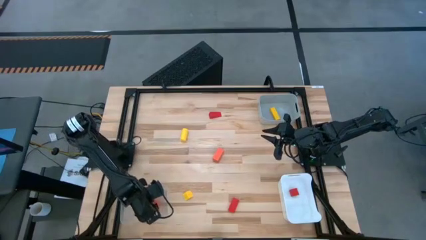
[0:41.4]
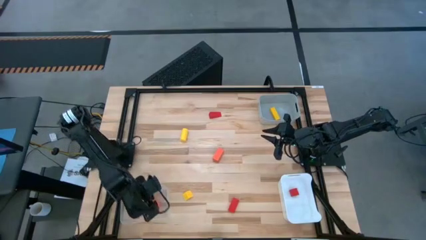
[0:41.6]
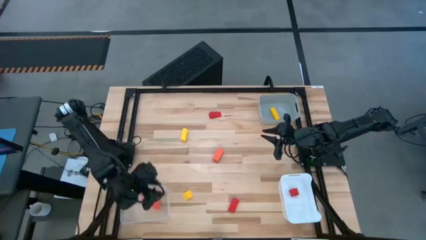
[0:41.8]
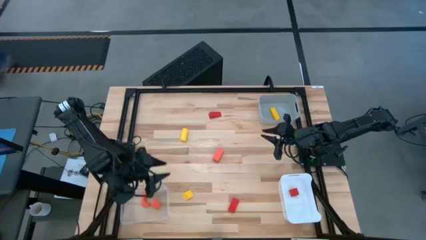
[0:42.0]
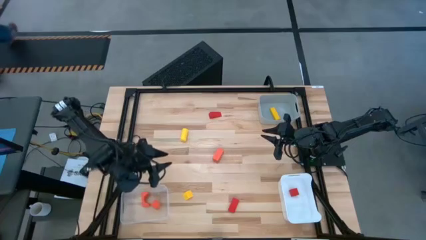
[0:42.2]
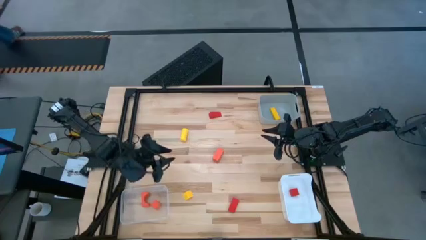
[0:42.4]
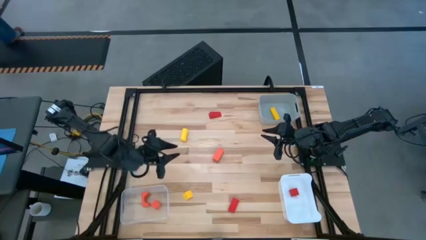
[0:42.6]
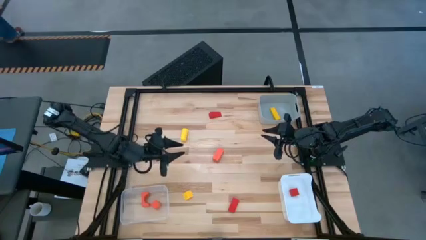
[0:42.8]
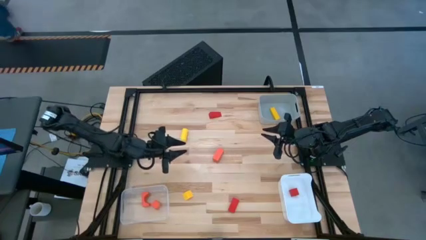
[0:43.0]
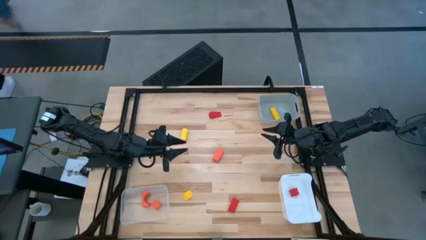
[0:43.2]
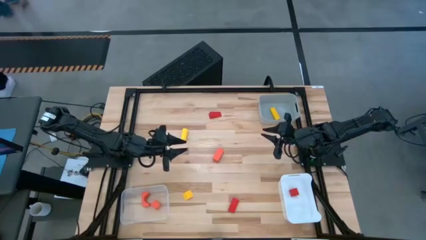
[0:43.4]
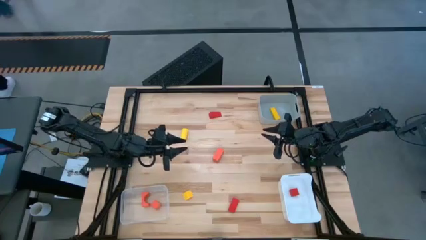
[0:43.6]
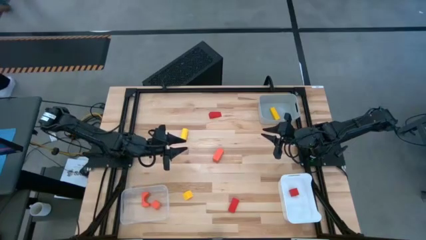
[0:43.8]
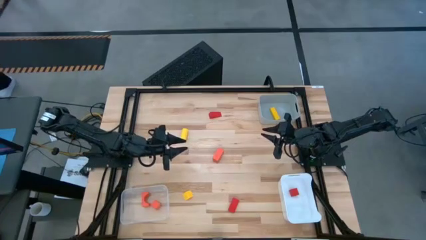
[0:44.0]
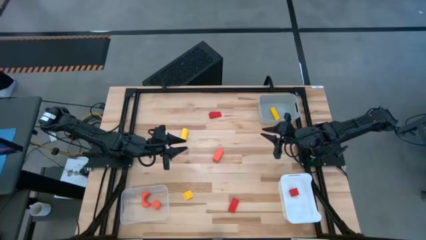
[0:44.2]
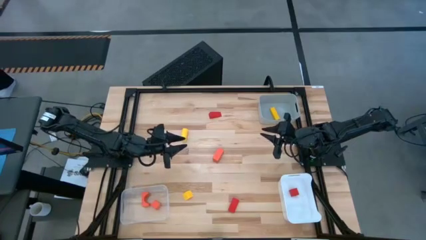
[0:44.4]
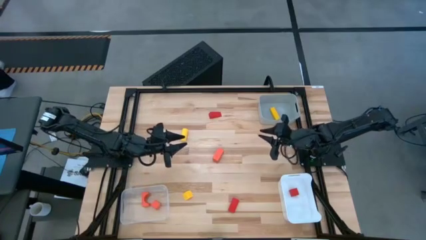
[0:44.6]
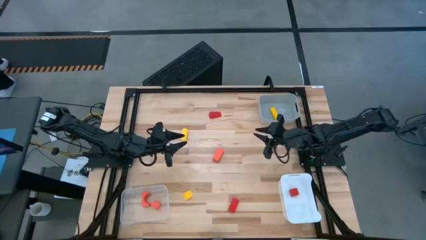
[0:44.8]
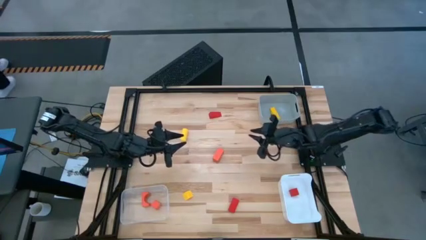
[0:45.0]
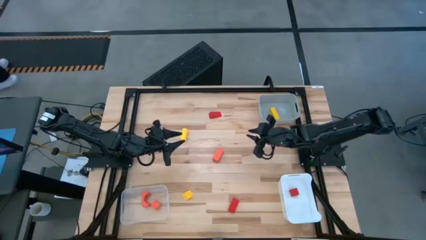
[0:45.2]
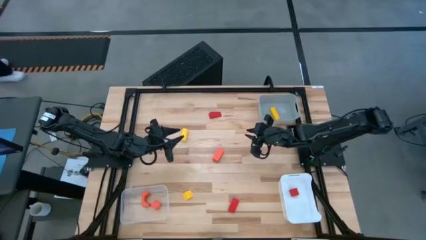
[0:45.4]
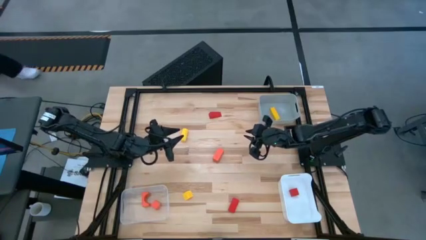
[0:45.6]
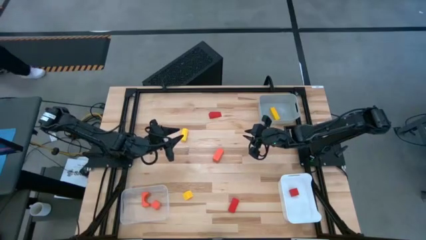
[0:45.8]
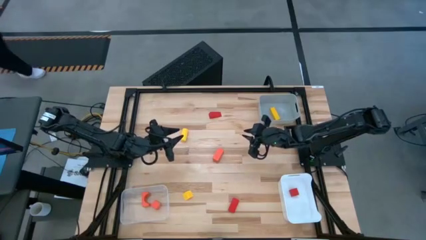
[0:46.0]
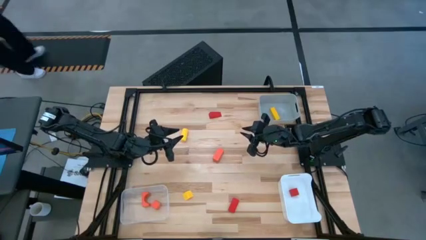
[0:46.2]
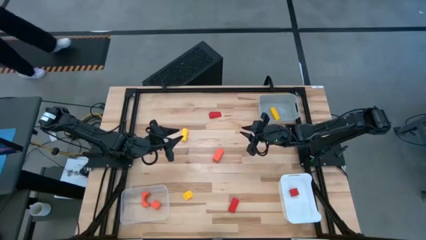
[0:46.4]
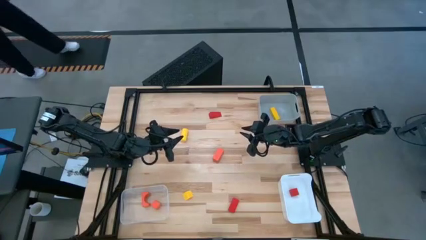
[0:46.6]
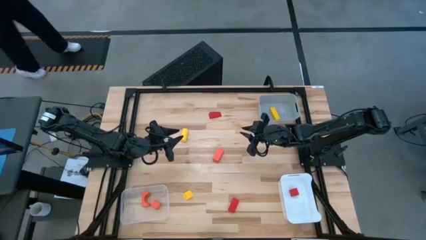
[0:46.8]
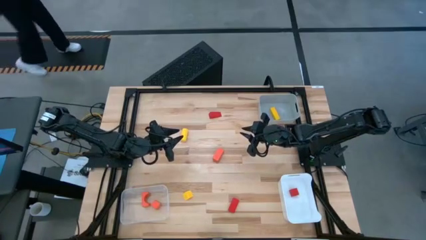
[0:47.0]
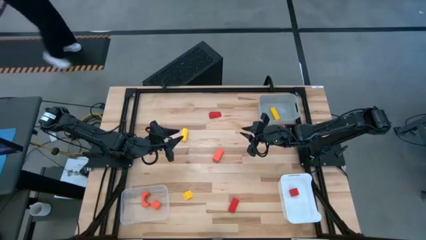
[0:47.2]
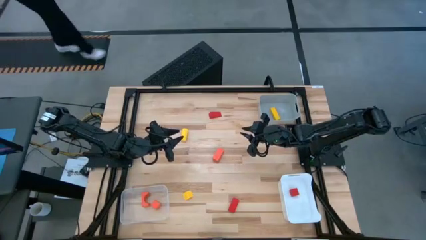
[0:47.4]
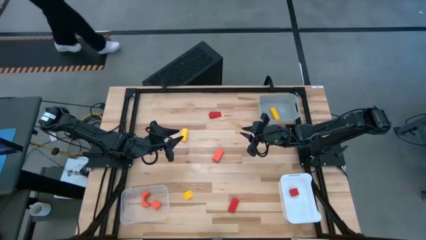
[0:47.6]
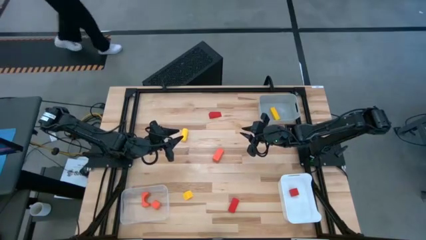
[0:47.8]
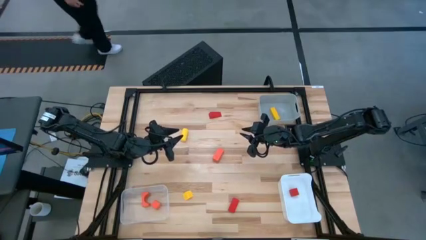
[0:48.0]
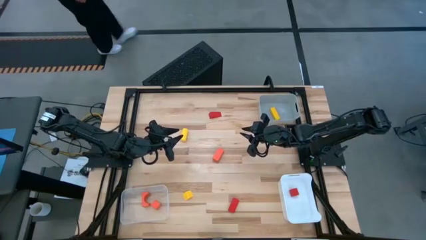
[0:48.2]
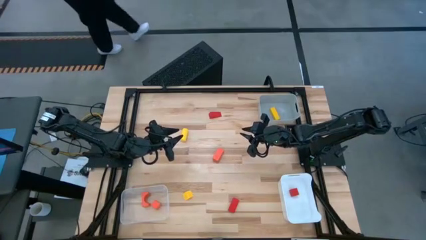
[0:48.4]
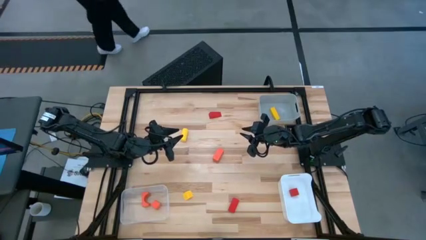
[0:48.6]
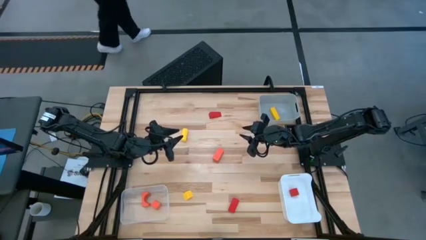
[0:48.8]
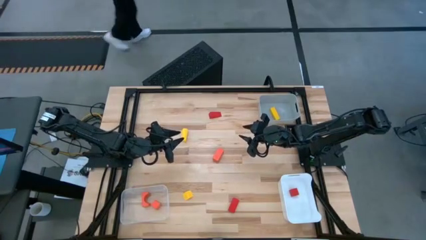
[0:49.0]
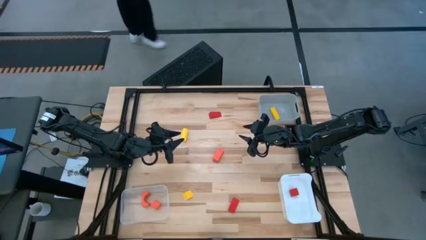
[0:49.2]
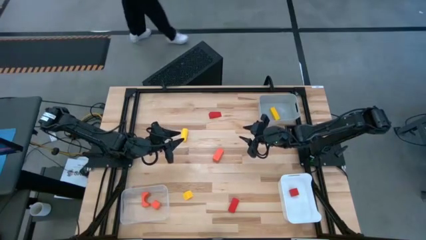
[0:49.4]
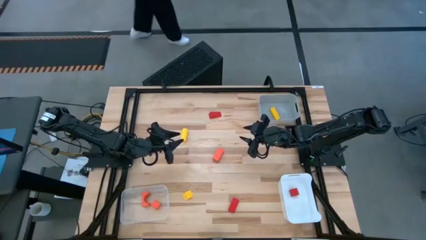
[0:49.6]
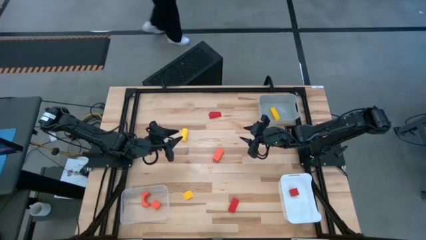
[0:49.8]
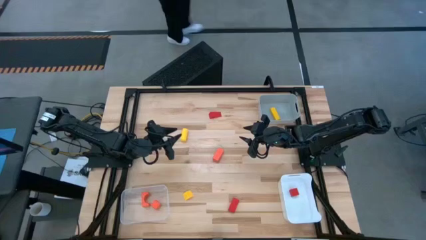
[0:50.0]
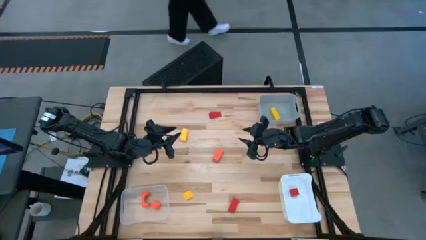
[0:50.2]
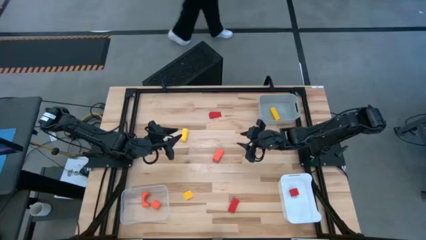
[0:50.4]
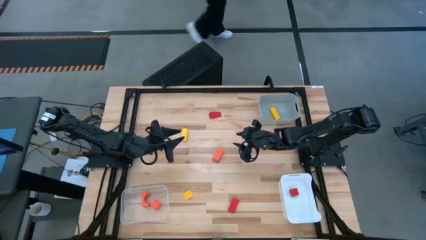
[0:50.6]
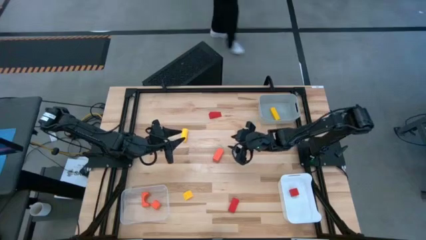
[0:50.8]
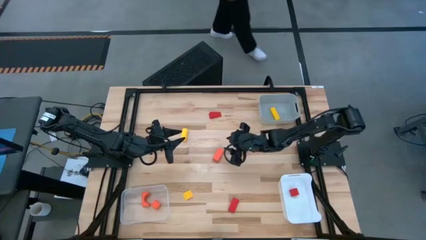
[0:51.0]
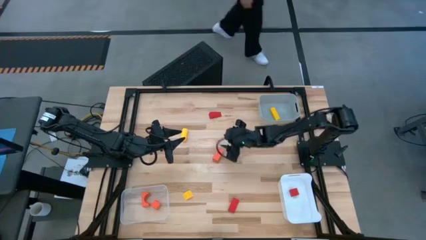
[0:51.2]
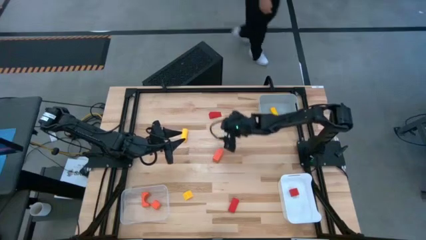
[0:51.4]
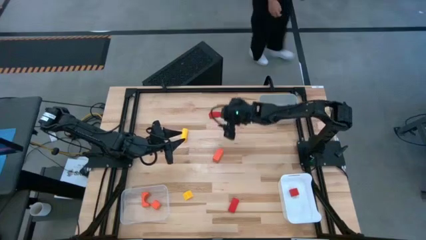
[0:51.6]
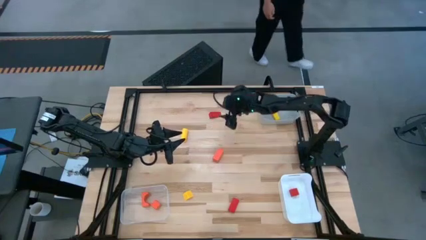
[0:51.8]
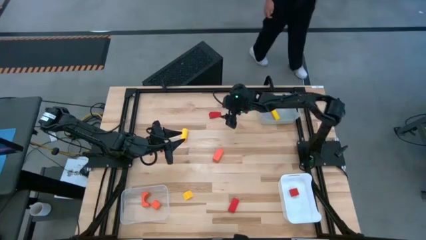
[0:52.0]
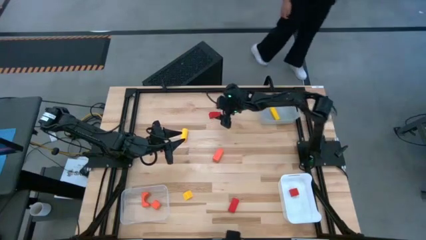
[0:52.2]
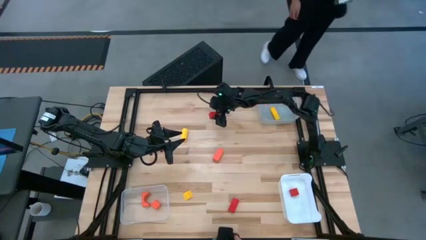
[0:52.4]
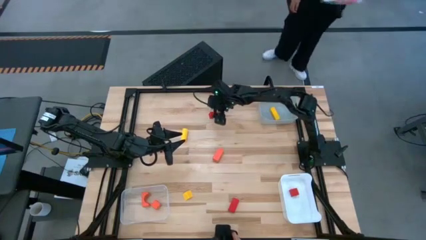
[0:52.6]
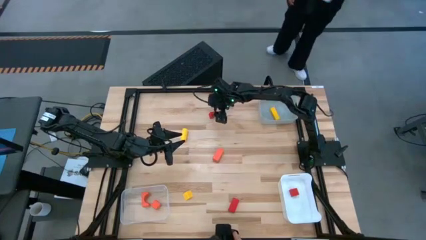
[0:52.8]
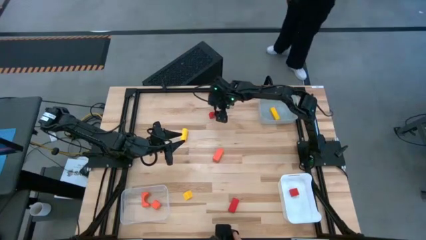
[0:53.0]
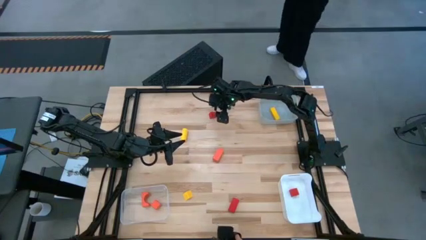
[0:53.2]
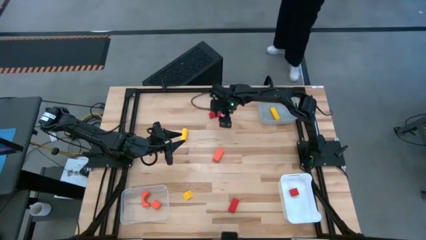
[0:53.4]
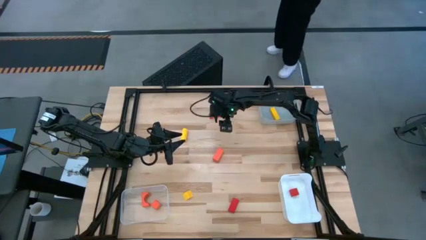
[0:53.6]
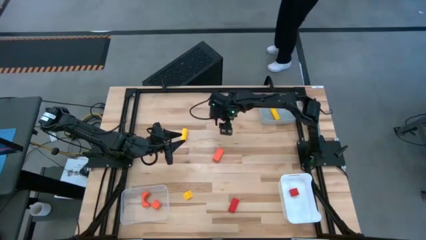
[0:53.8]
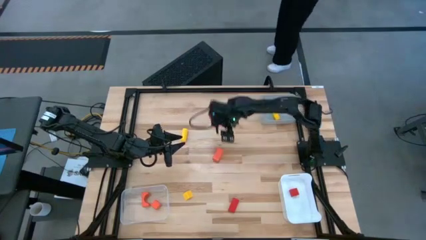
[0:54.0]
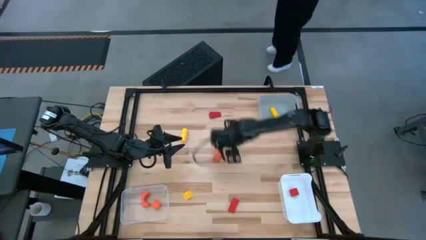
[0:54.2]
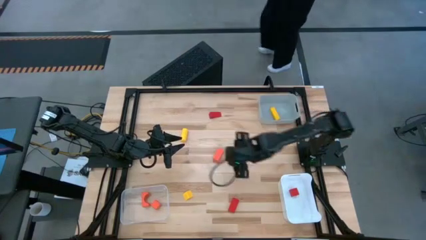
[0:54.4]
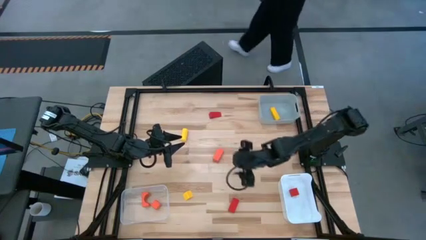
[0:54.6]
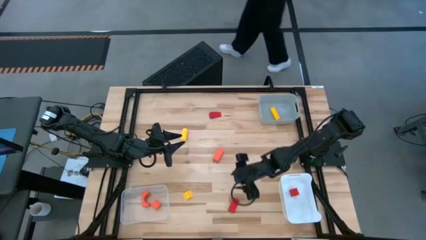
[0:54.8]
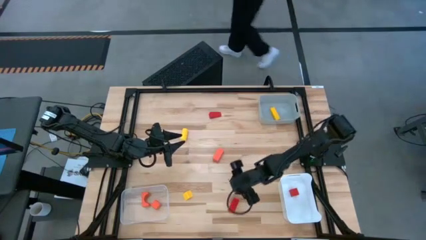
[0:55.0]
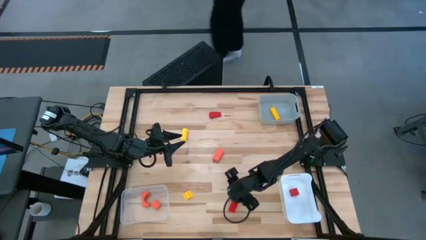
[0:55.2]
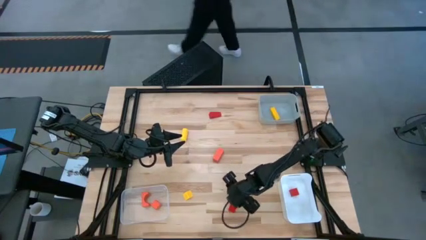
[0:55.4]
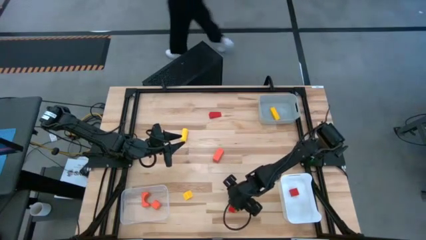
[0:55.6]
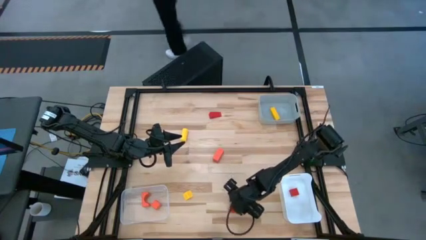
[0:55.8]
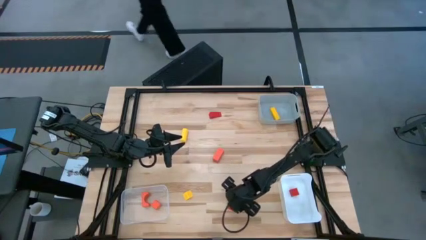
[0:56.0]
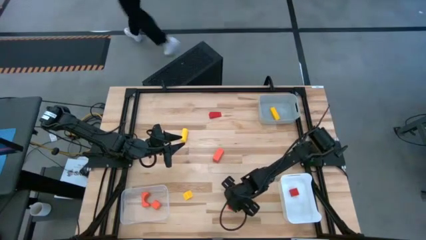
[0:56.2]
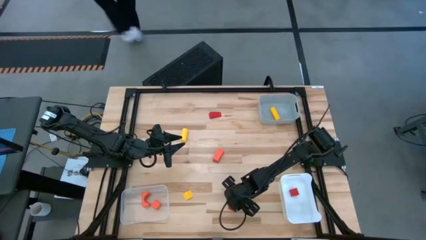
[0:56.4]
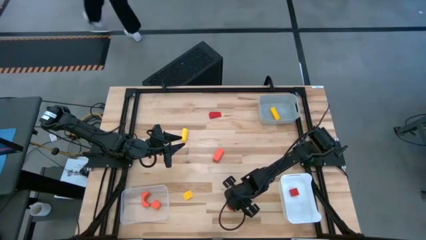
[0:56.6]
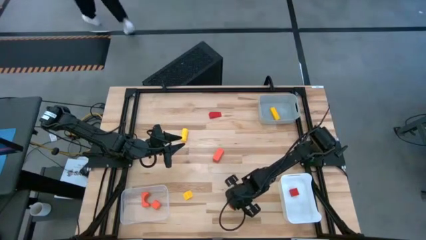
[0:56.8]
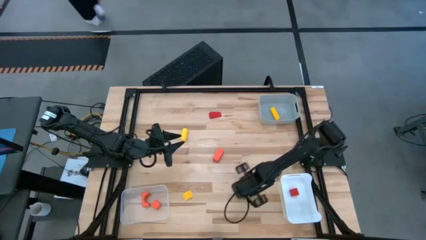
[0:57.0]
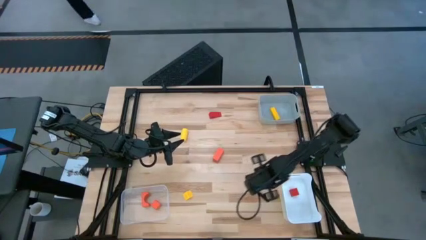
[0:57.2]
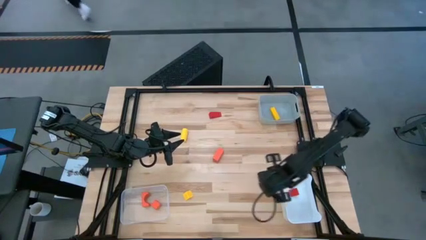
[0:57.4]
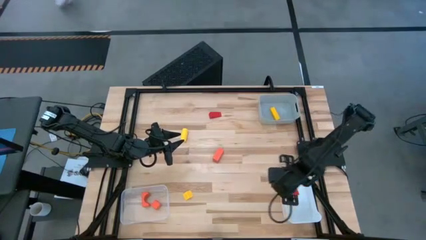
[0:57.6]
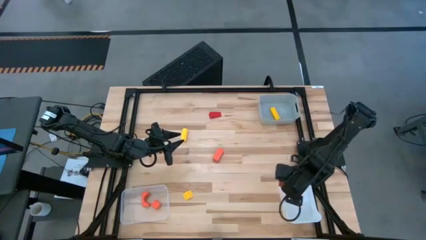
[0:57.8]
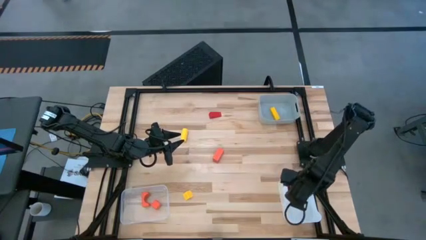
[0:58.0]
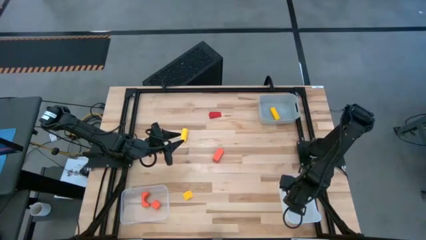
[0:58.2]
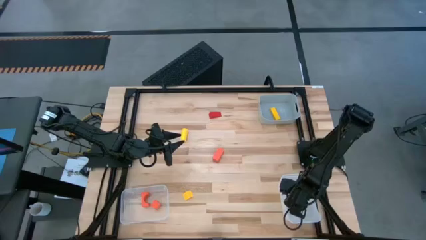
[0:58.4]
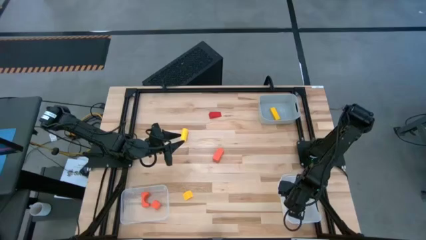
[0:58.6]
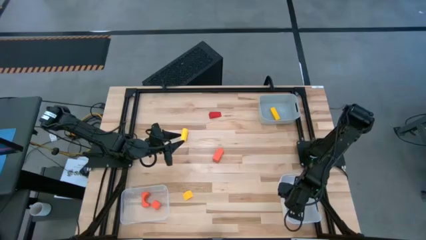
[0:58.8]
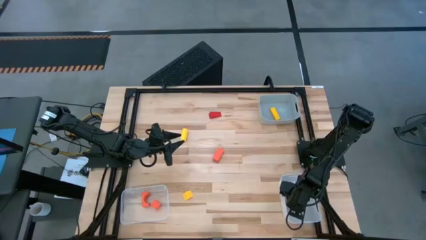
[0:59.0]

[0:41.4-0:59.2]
Task: Sort & place blocks by color
Put the bottom red block into the white bin
